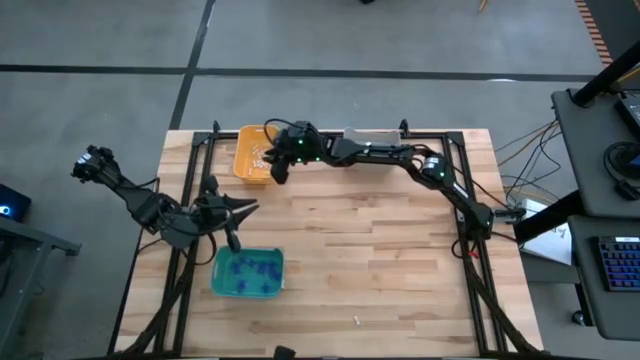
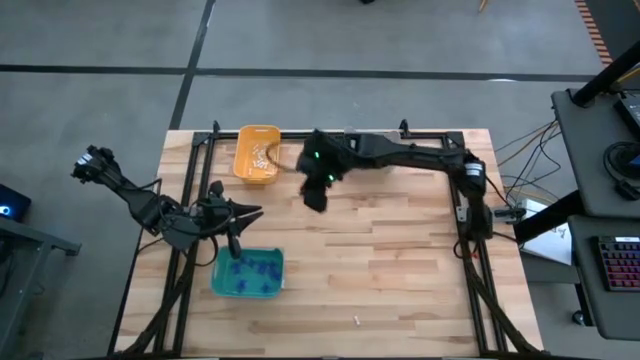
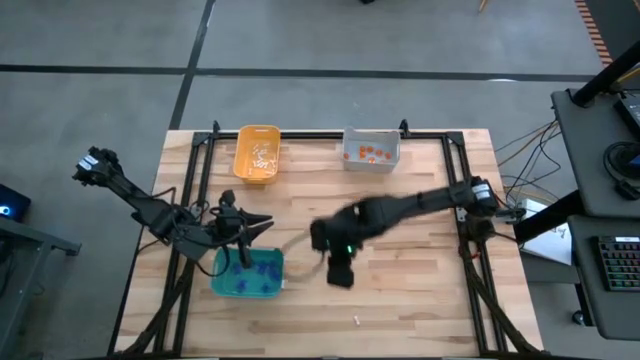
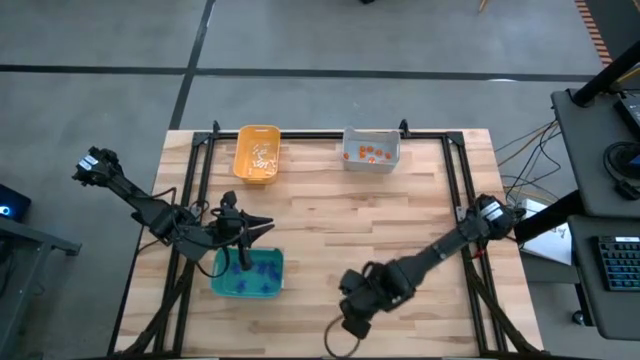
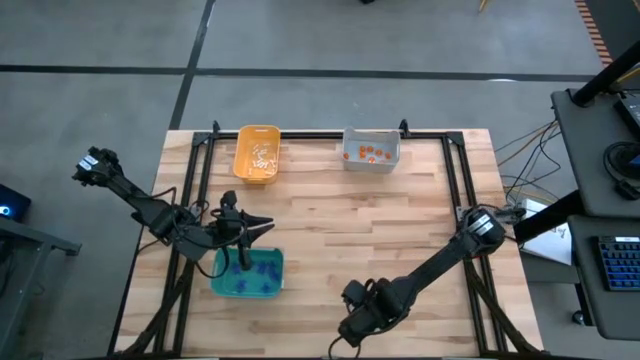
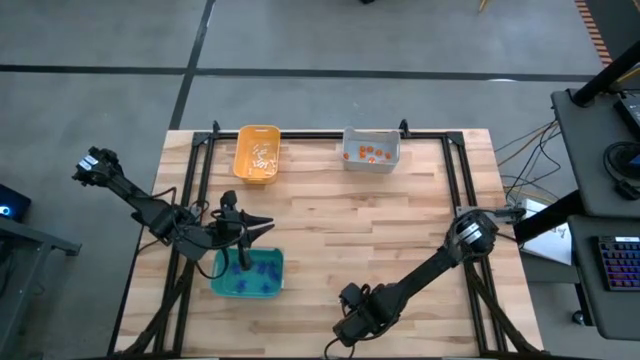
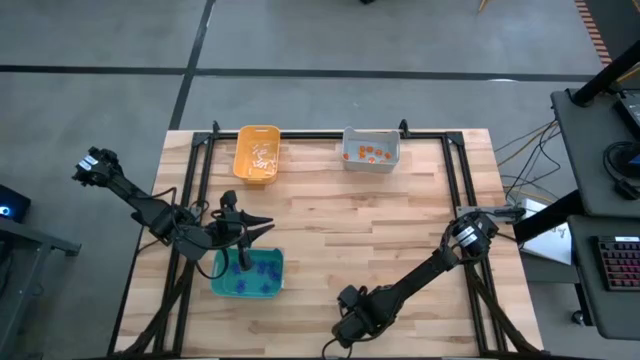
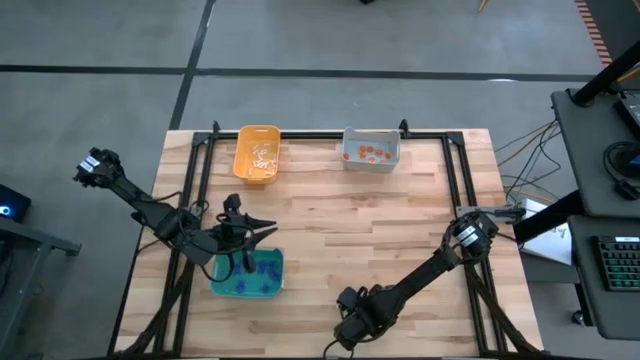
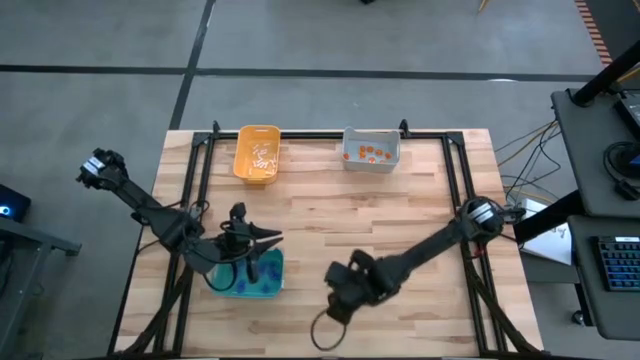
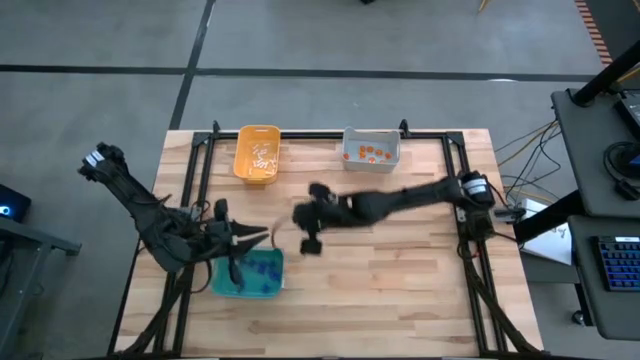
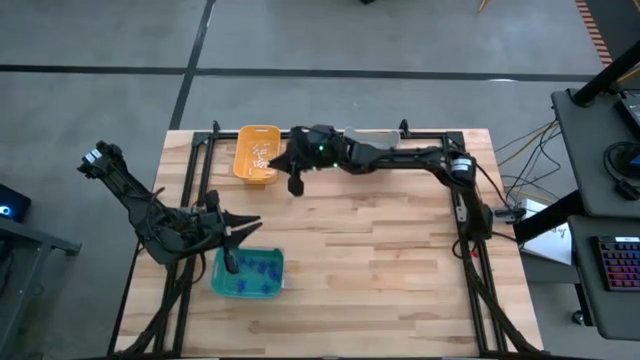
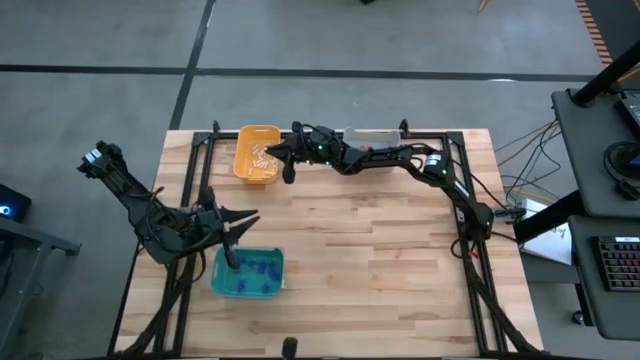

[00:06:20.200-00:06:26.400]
Task: Sort Halloween decoration
Put the white bone toy into the orange bin

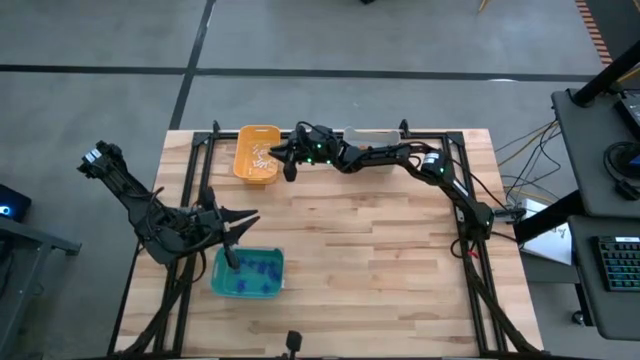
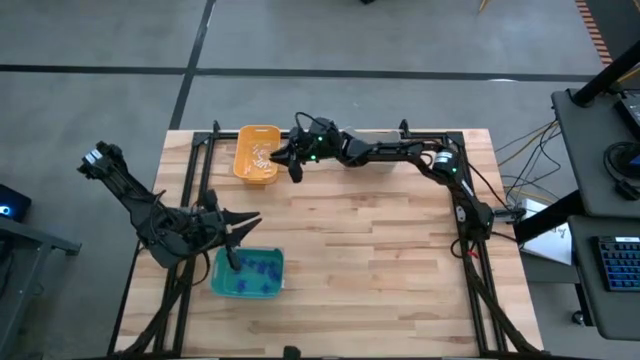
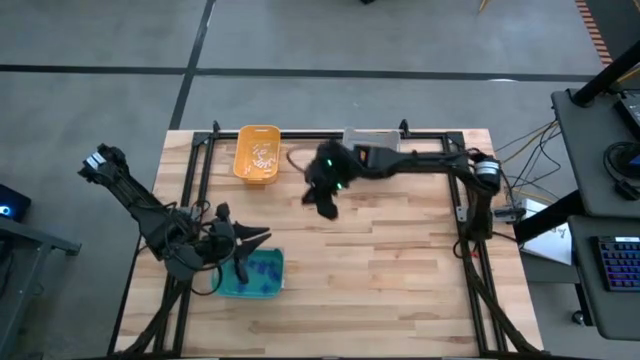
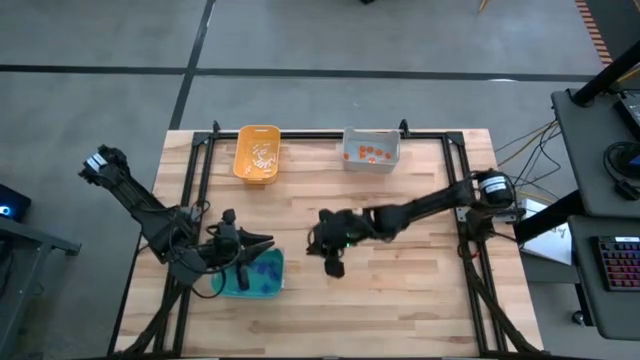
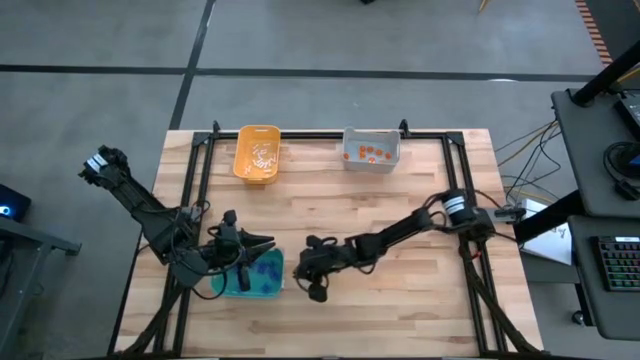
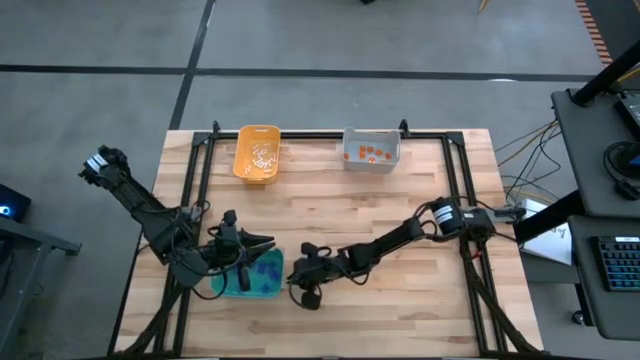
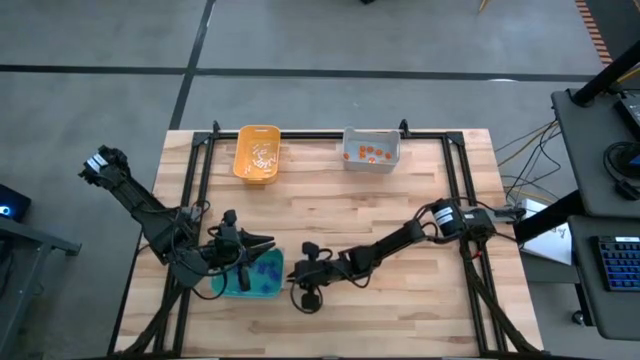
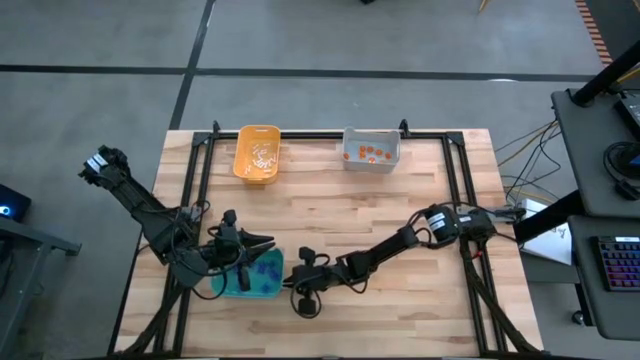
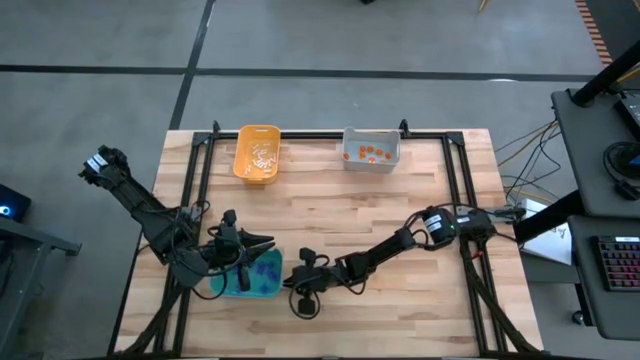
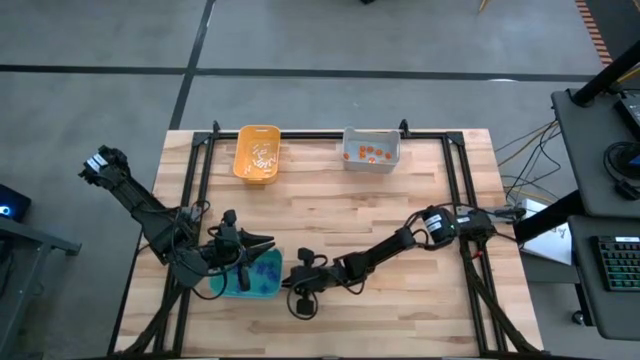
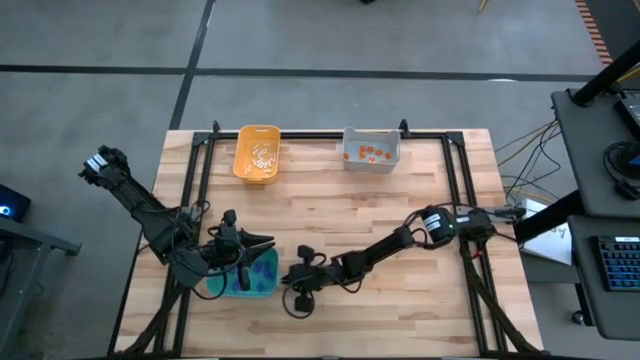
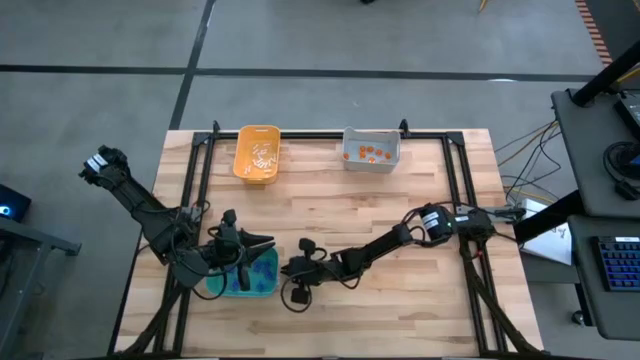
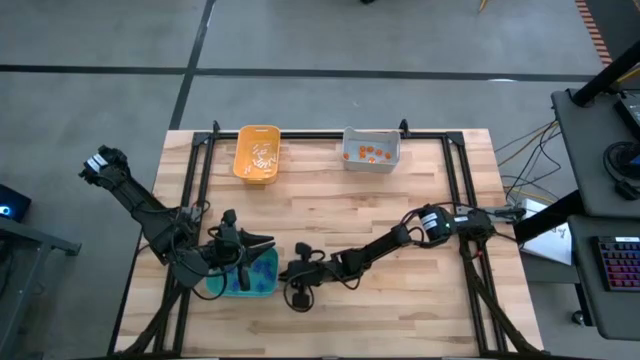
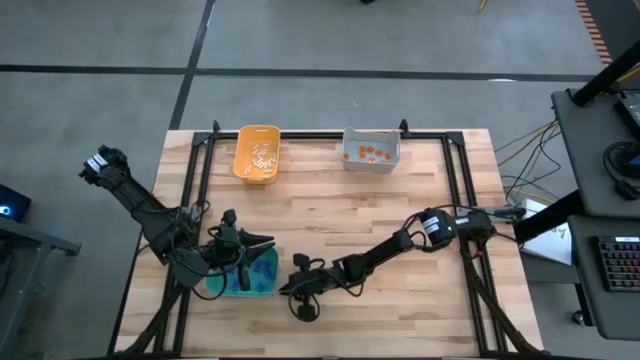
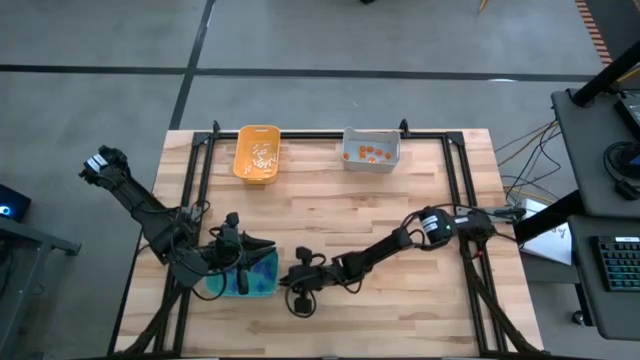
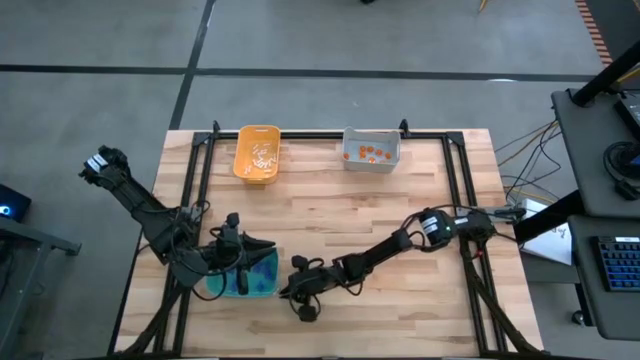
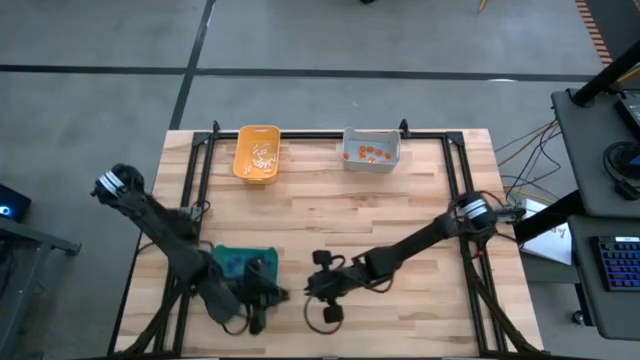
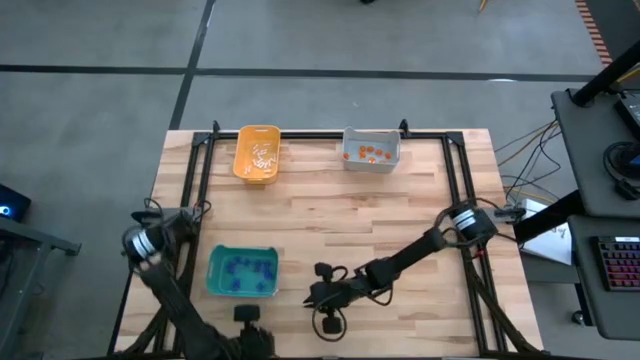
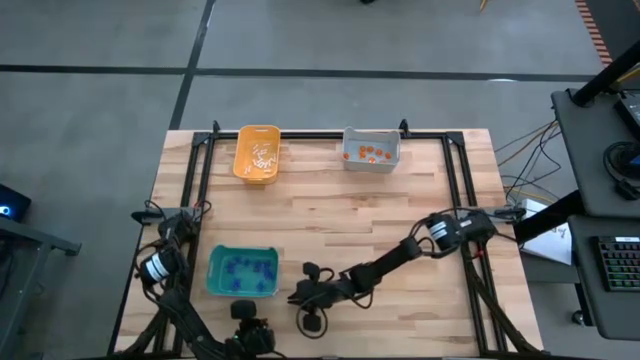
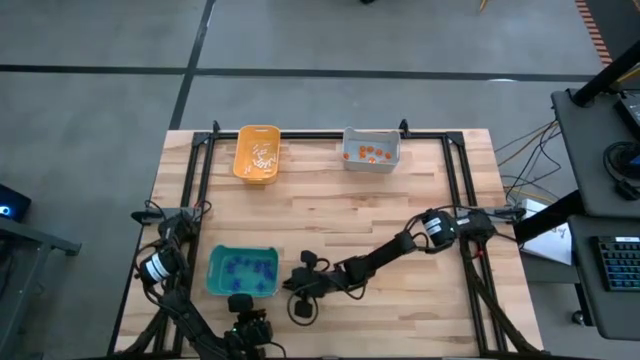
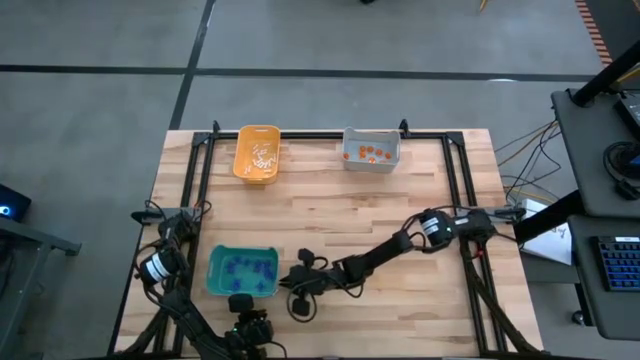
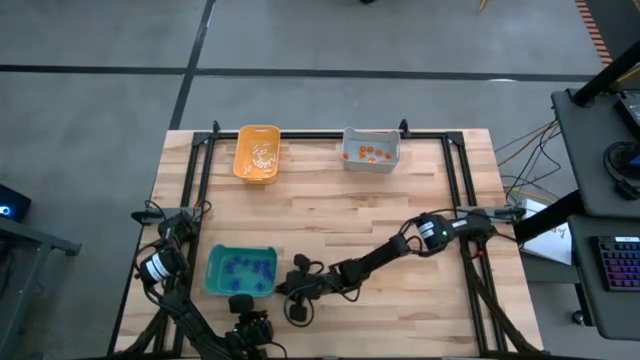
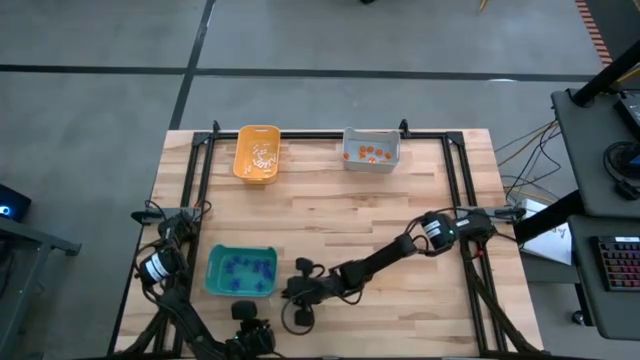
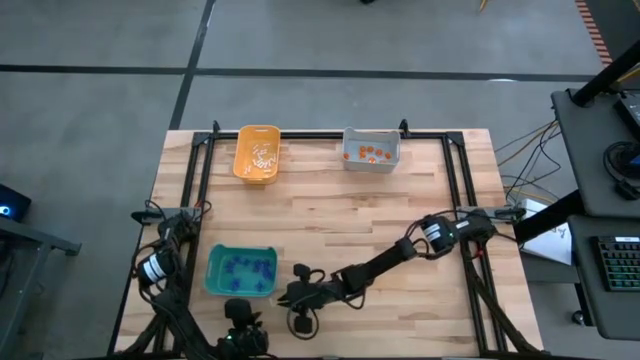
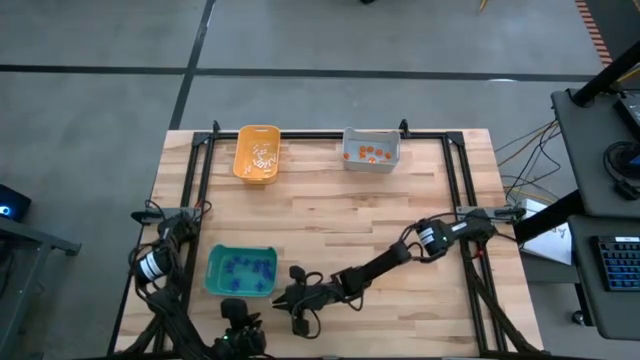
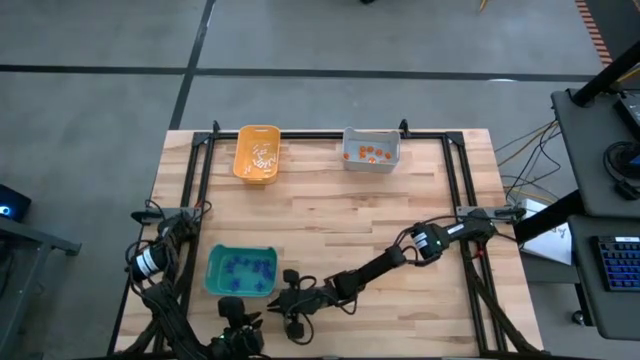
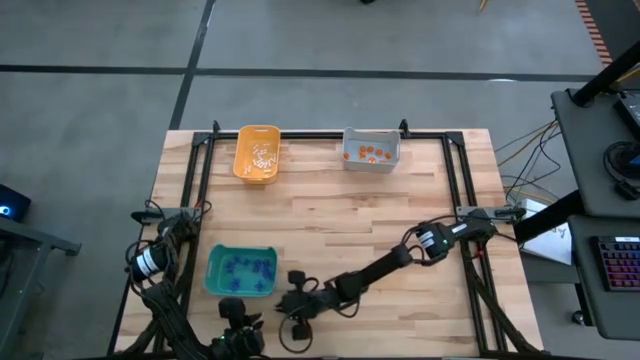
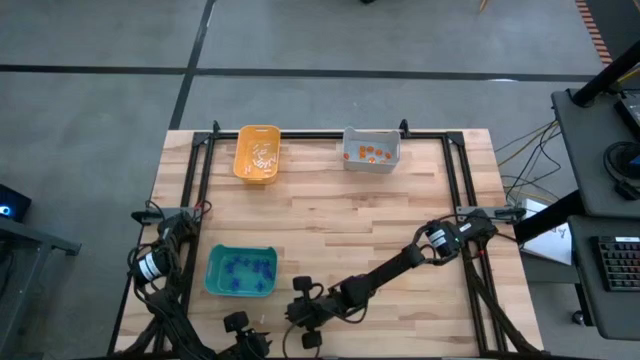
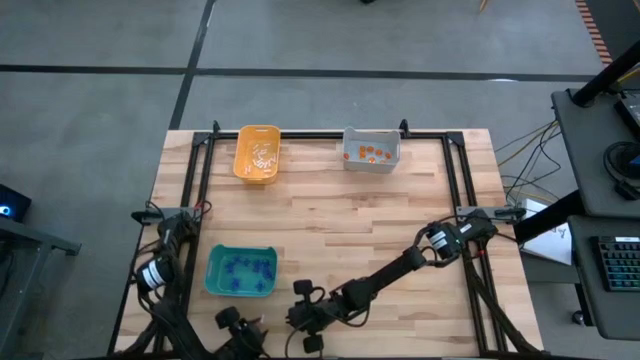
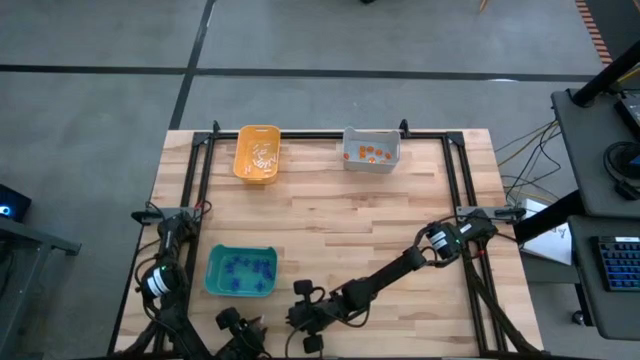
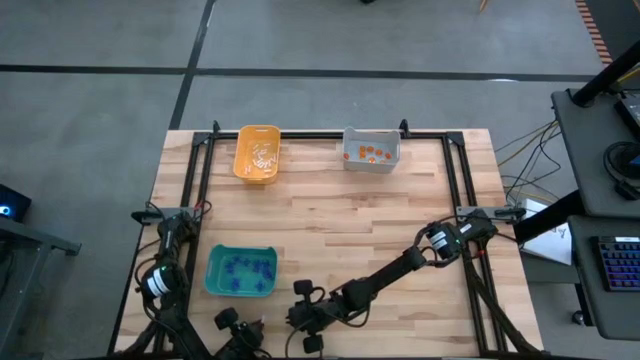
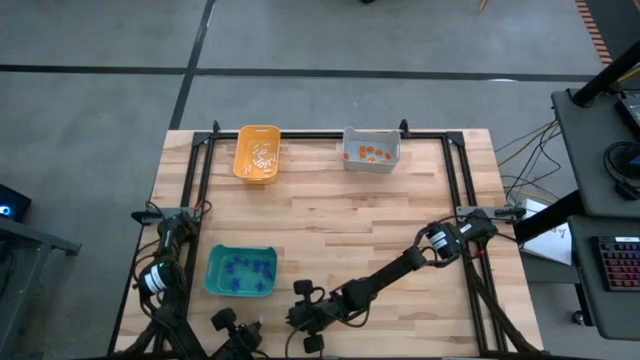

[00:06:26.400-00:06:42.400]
Put the white bone toy into the orange bin
